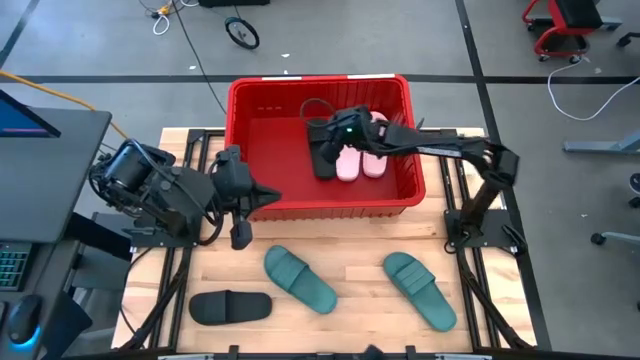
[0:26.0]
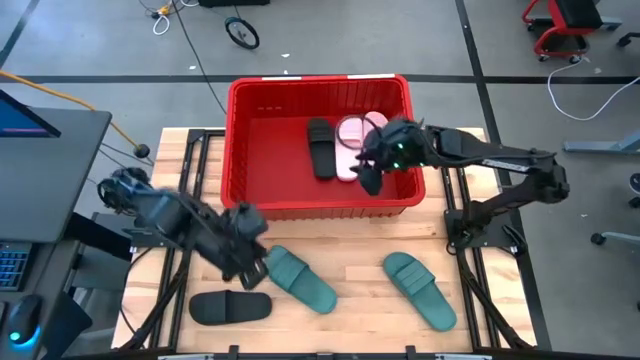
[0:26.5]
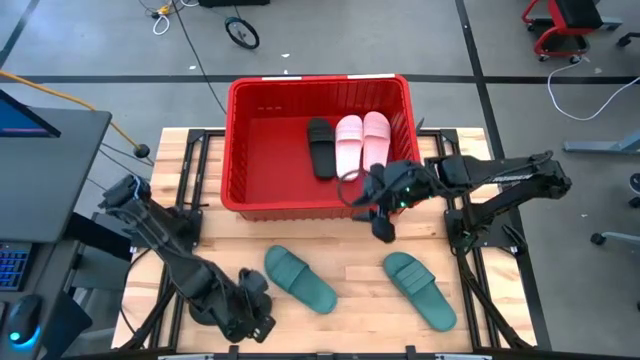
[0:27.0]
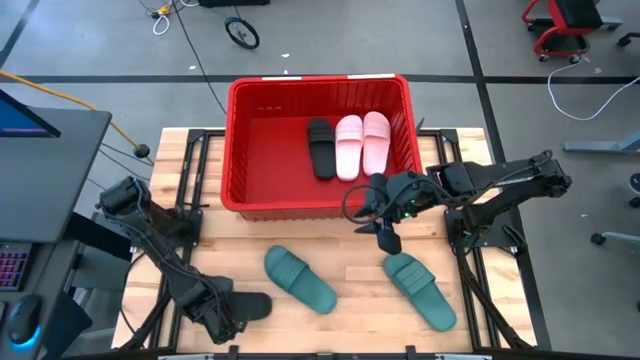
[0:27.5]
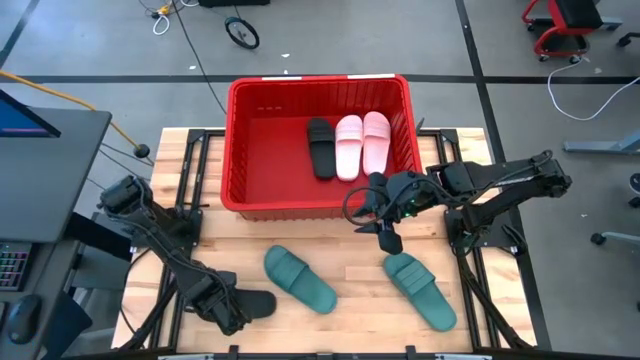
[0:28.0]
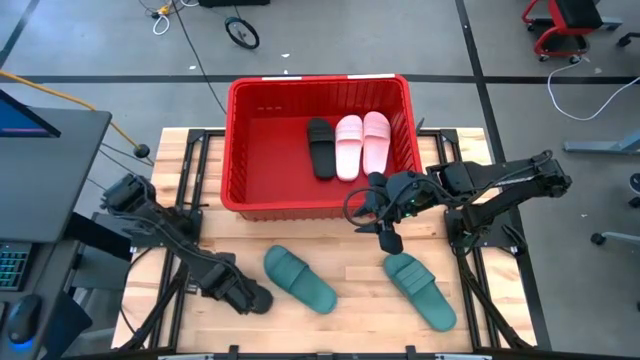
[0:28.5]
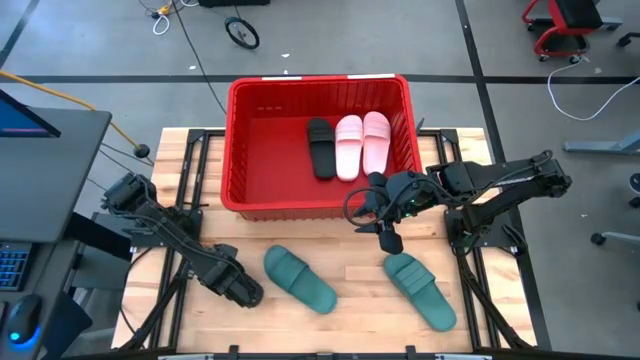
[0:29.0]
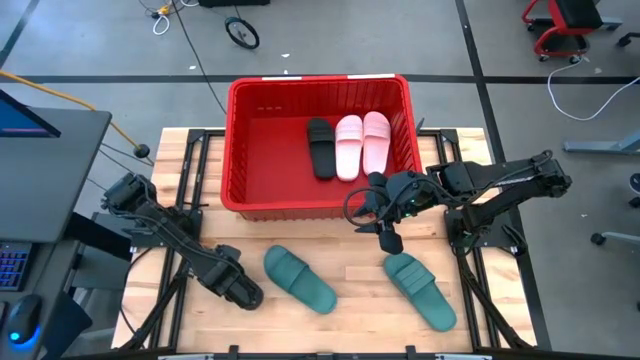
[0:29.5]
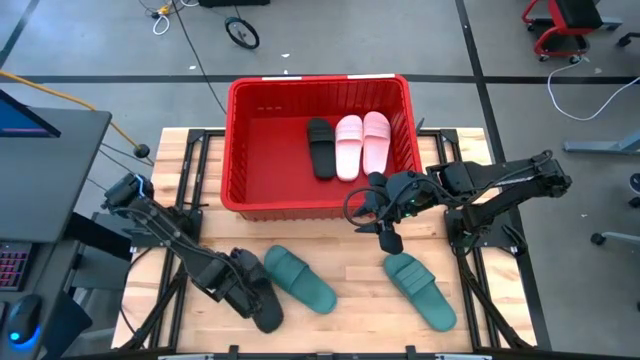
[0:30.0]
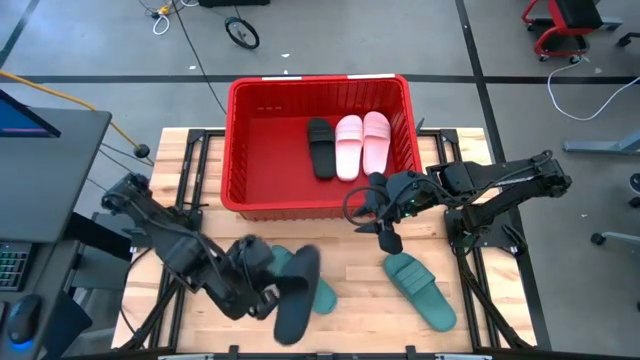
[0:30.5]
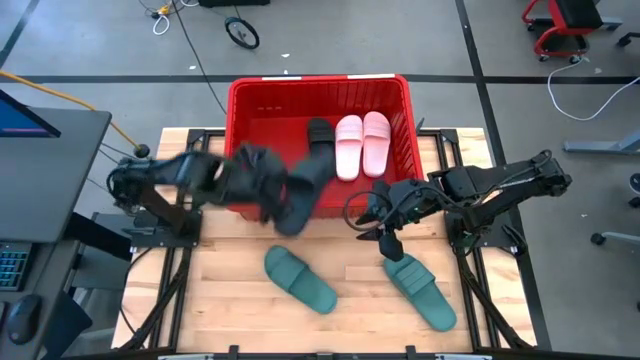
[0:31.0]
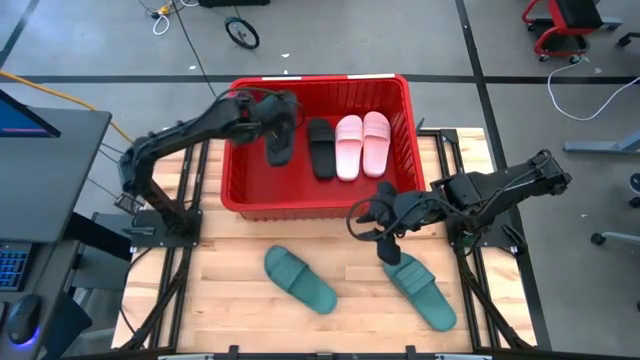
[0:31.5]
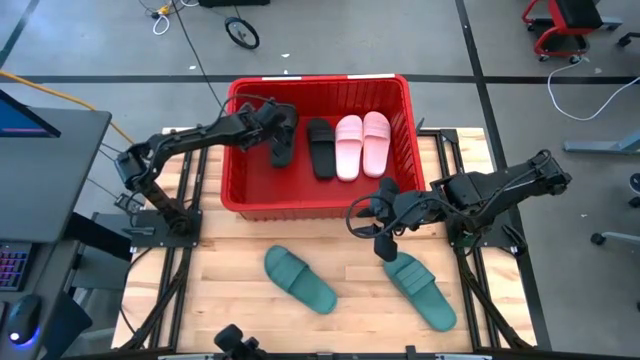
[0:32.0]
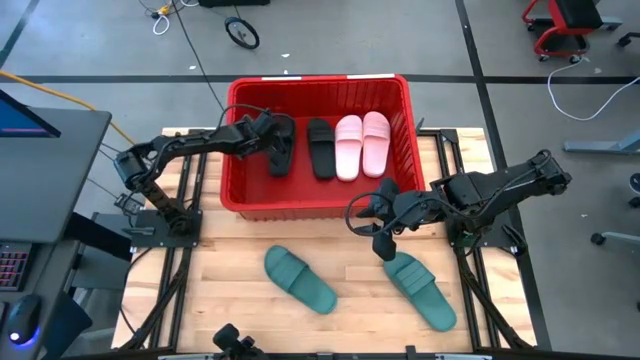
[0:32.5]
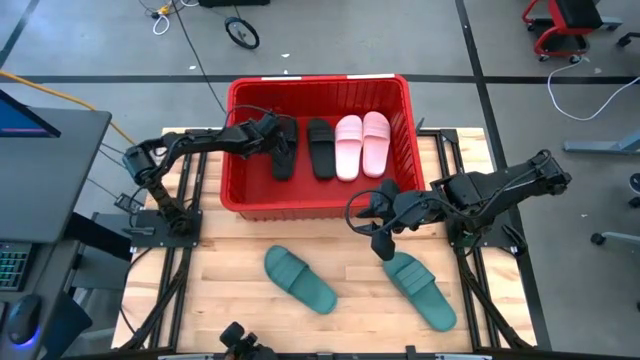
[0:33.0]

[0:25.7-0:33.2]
Task: Pick and place slides into bin
Put the black slipper into the red bin

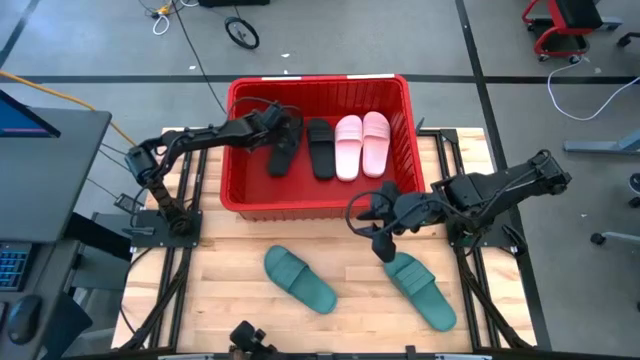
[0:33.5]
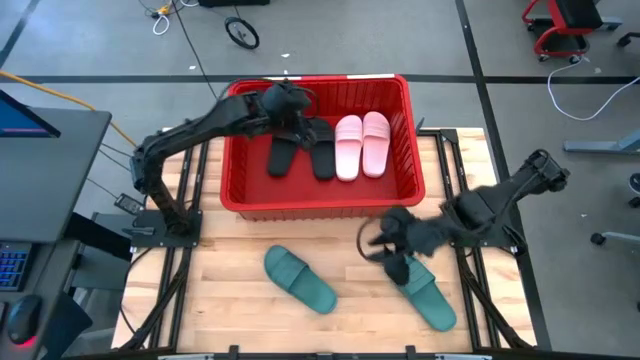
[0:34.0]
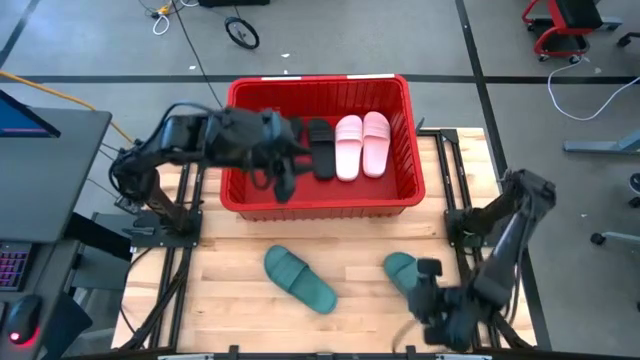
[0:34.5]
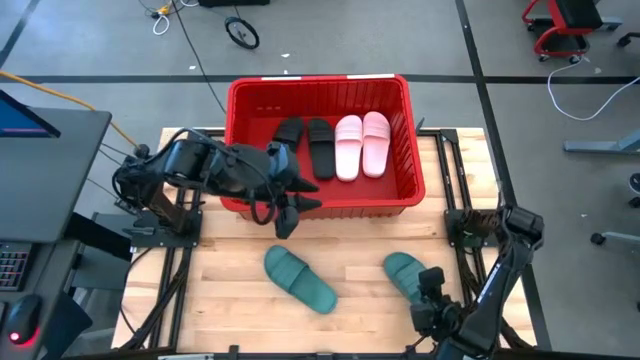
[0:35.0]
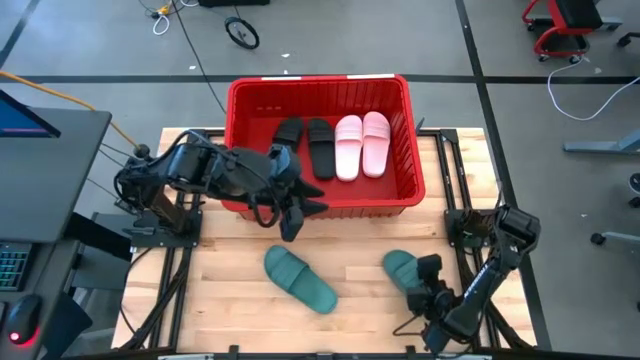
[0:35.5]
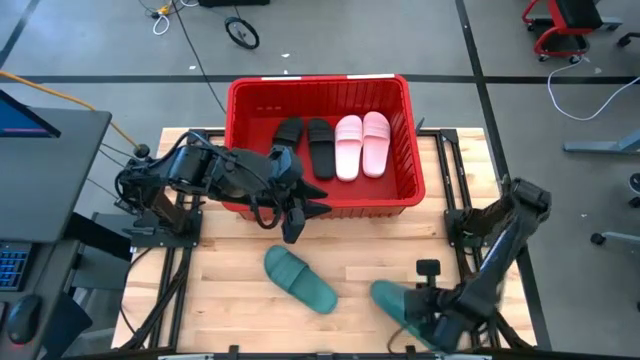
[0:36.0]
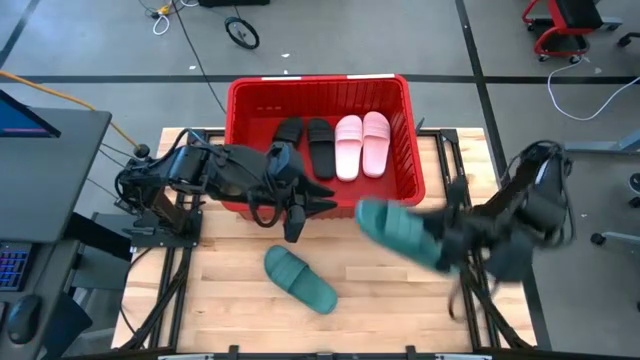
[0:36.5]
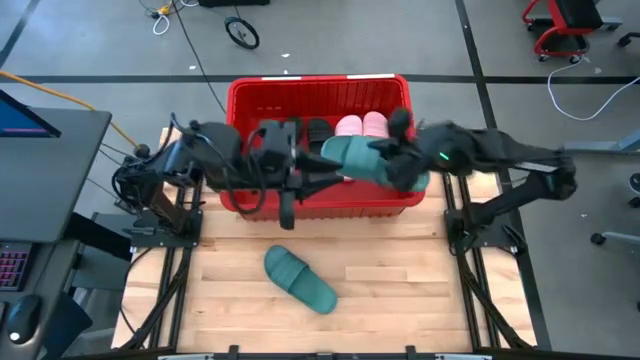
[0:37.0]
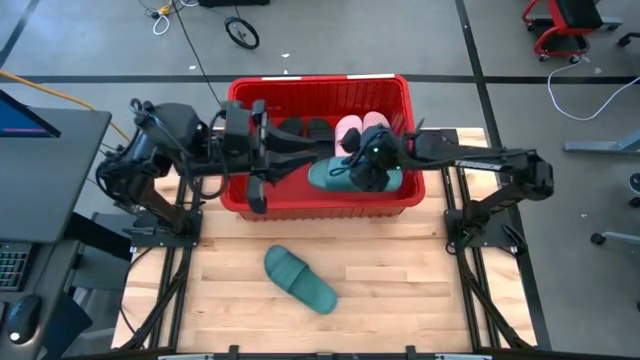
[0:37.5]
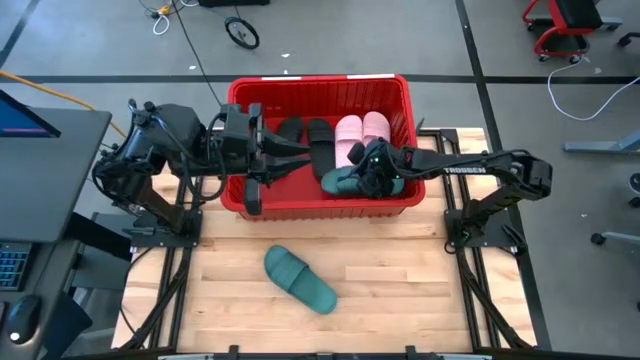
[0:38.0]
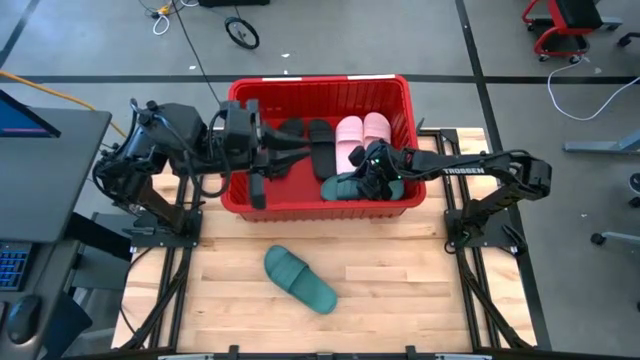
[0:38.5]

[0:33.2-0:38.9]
Put the green slipper into the red bin

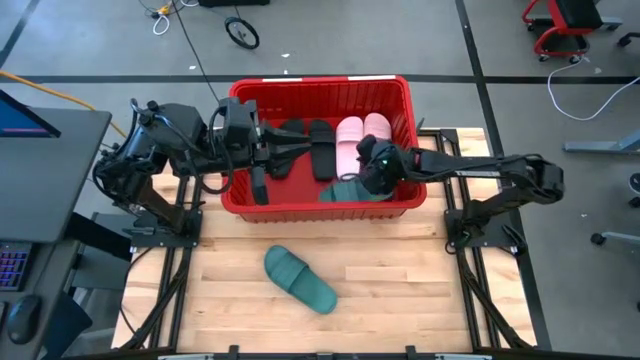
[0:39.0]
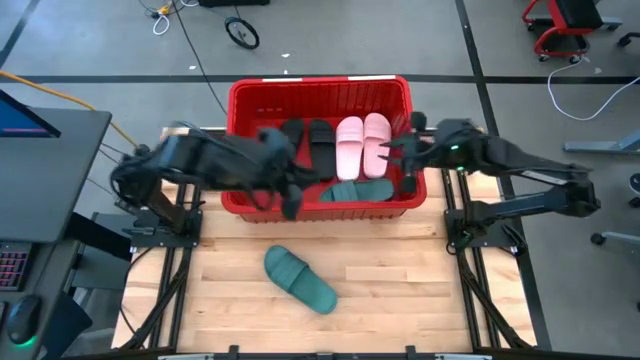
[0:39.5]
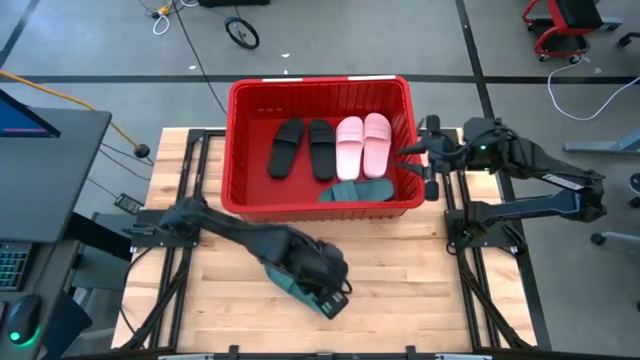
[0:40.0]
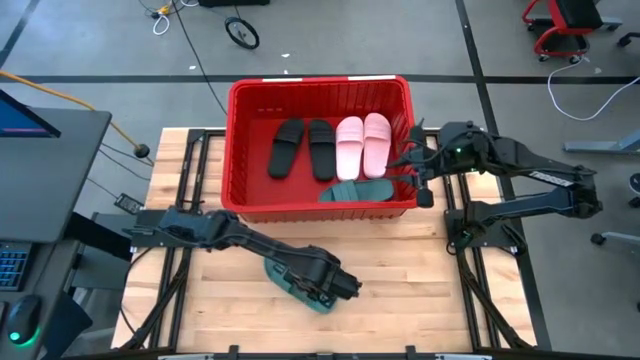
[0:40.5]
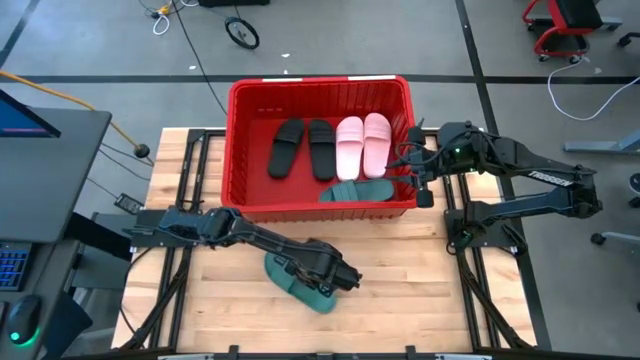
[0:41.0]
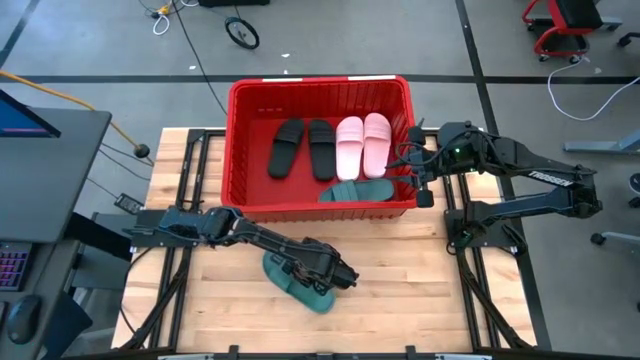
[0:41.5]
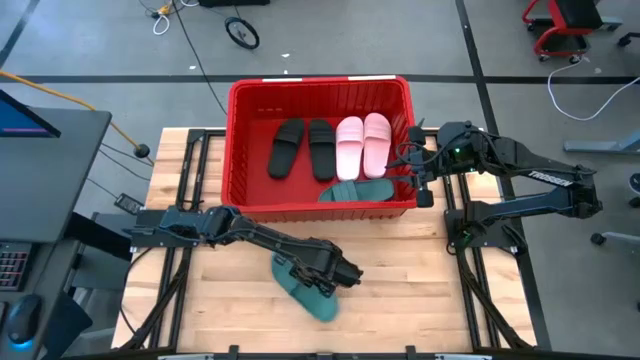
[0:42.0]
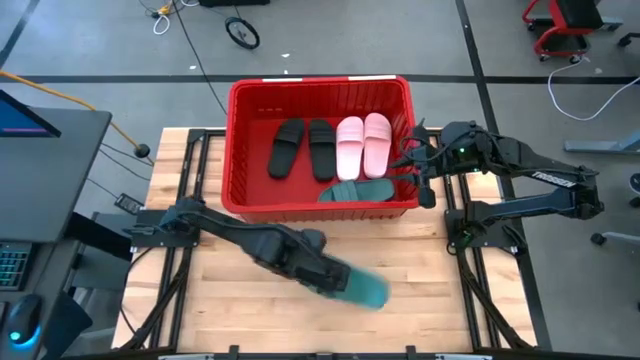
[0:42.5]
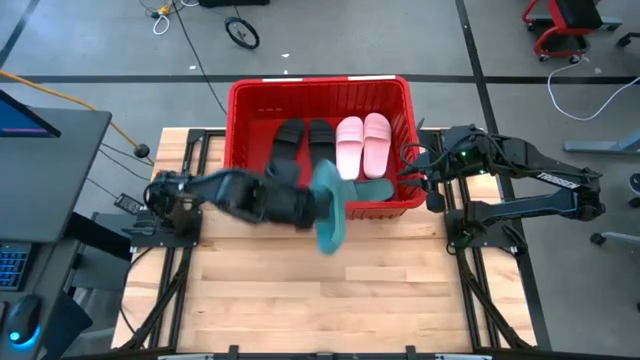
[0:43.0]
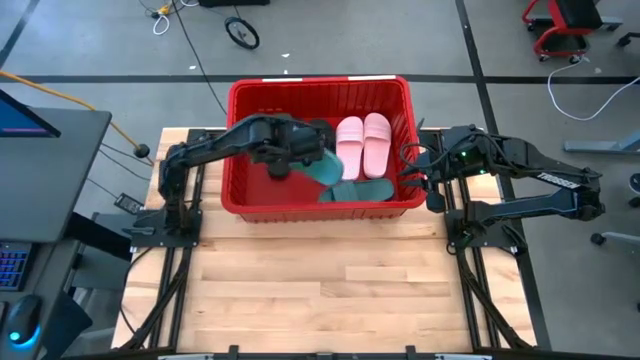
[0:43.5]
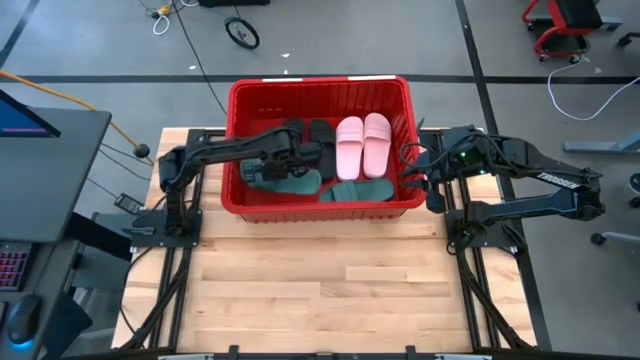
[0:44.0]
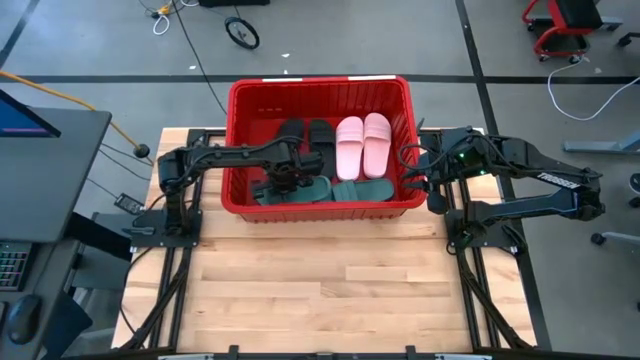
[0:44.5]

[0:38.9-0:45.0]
Put the green slipper into the red bin

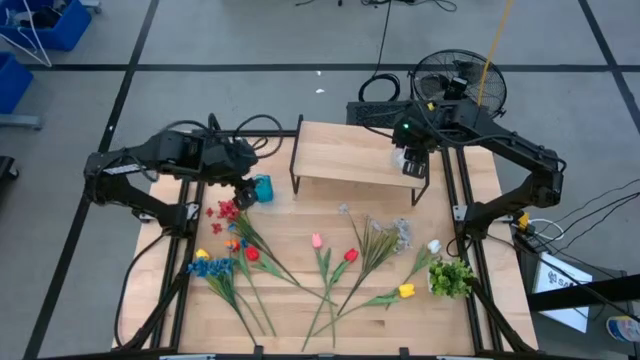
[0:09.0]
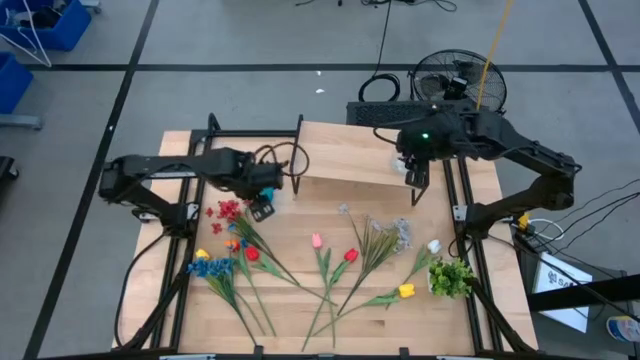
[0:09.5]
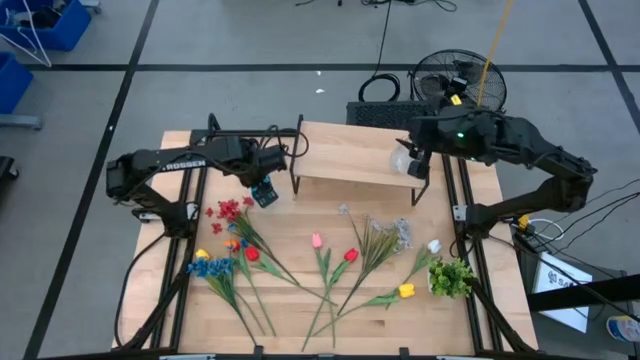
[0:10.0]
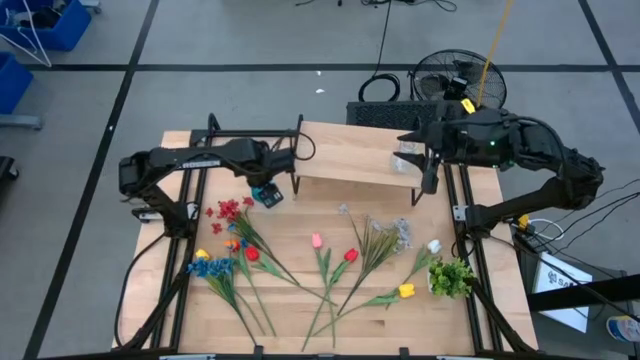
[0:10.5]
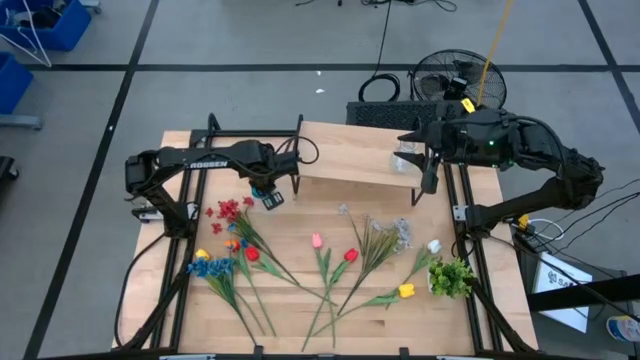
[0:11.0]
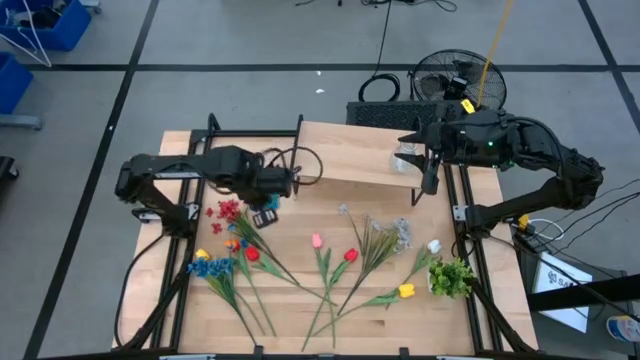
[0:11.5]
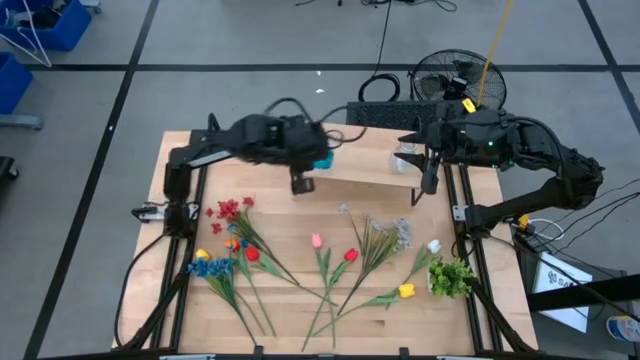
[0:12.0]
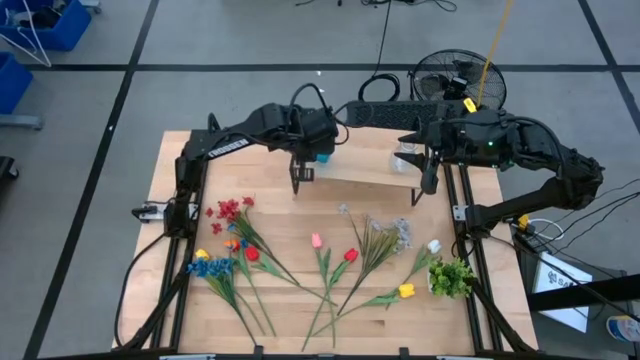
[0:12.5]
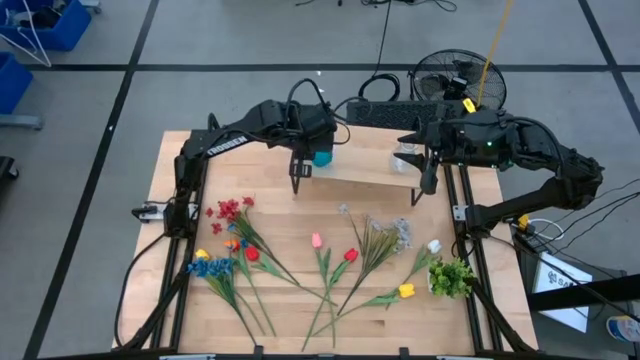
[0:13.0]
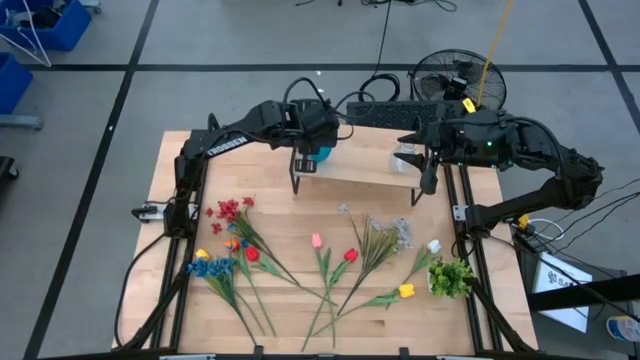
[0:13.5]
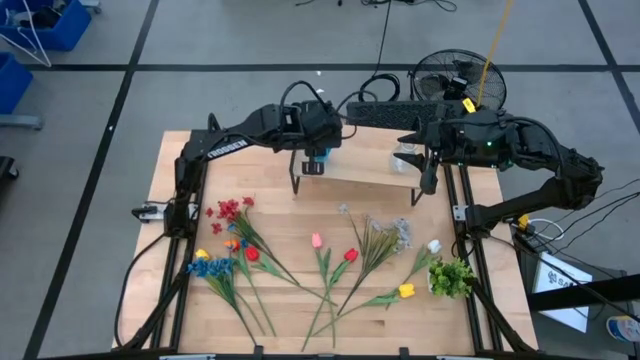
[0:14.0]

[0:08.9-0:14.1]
Task: Pick and place flowers into a vace then onto a shelf
Put the blue vase on the shelf
